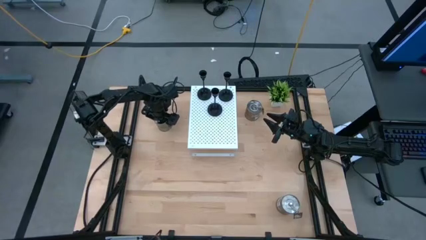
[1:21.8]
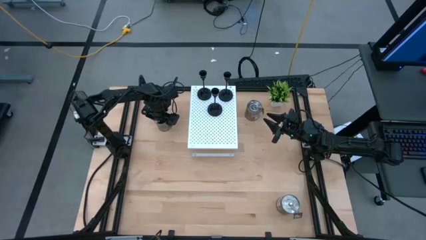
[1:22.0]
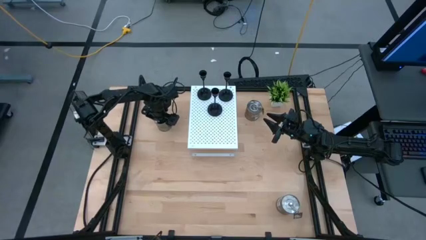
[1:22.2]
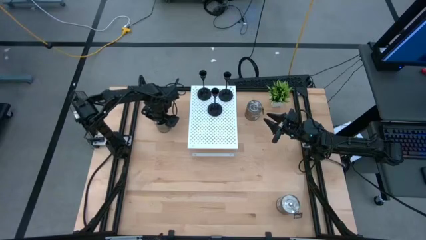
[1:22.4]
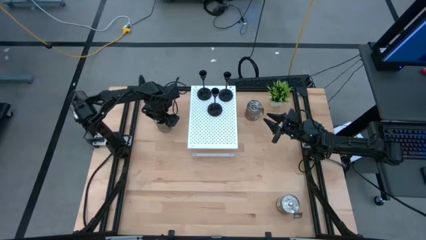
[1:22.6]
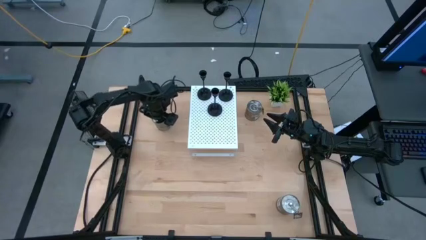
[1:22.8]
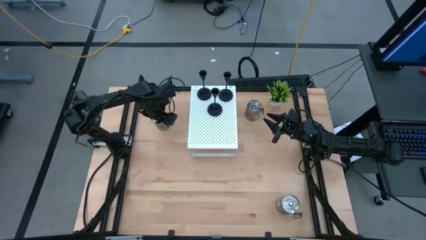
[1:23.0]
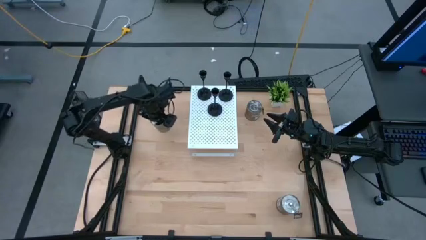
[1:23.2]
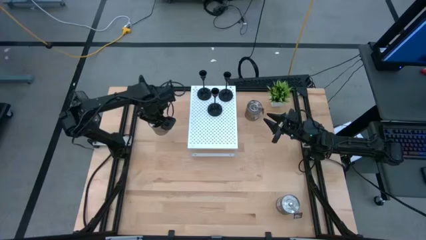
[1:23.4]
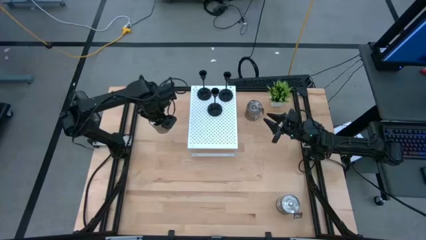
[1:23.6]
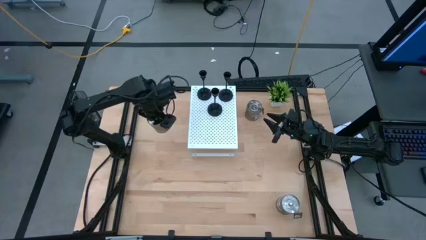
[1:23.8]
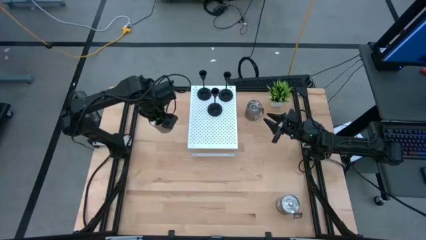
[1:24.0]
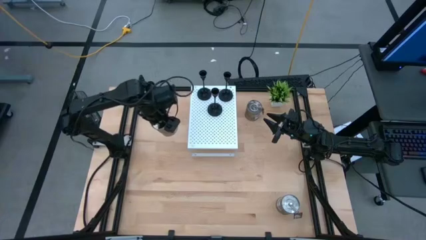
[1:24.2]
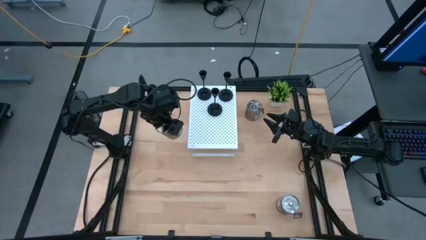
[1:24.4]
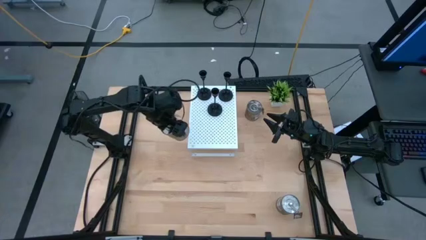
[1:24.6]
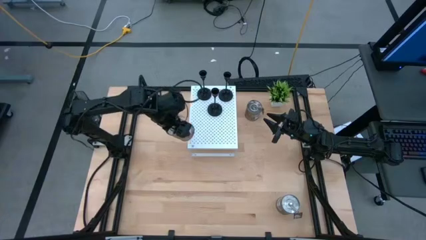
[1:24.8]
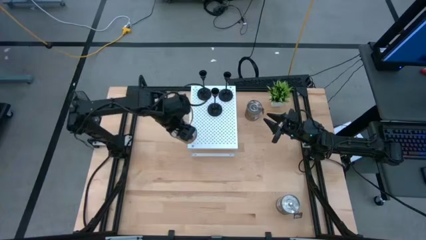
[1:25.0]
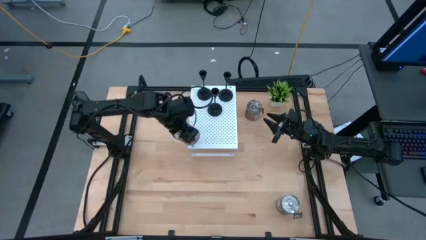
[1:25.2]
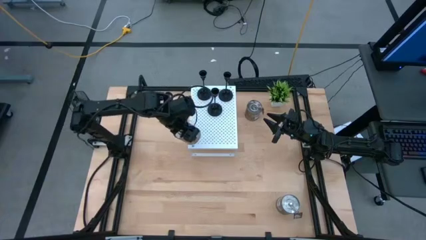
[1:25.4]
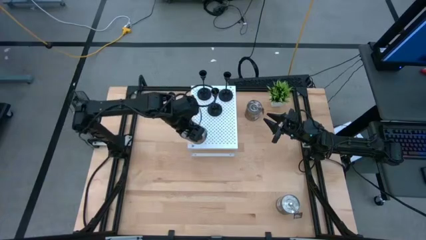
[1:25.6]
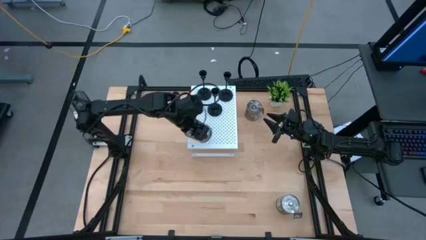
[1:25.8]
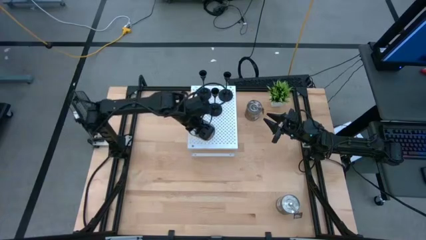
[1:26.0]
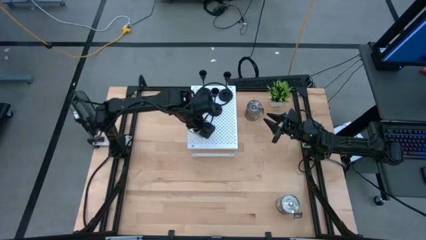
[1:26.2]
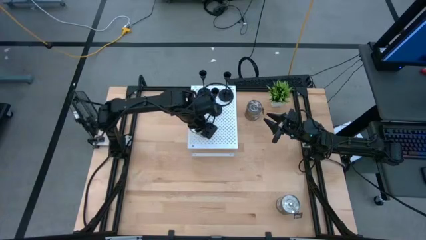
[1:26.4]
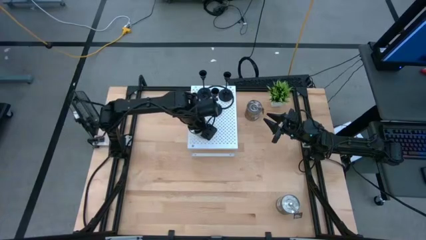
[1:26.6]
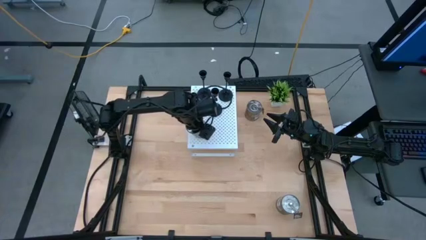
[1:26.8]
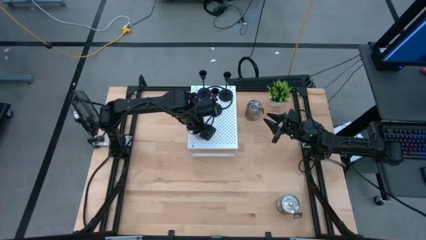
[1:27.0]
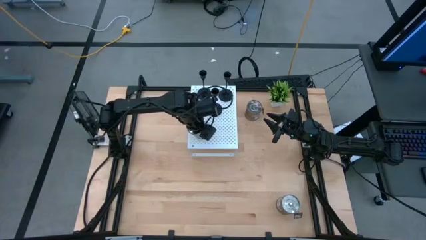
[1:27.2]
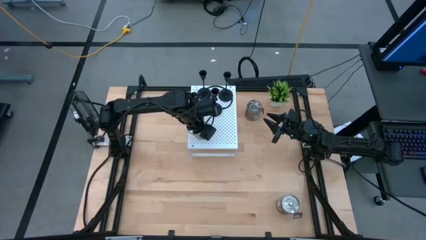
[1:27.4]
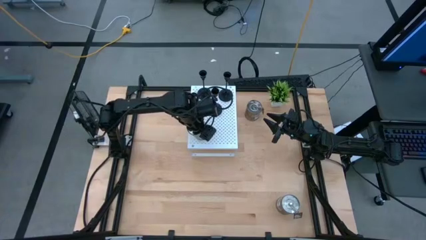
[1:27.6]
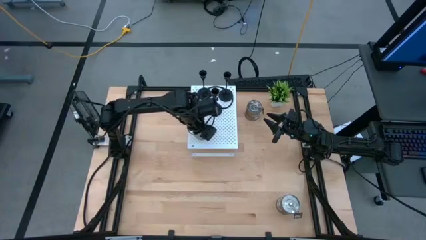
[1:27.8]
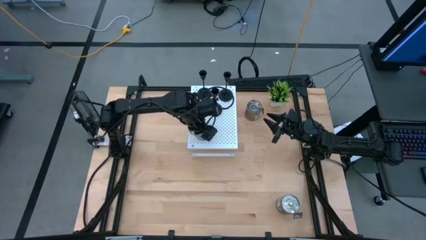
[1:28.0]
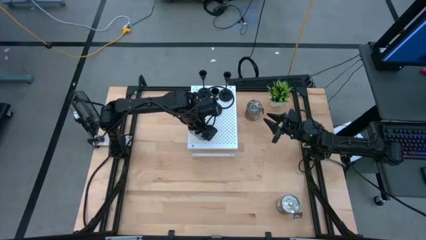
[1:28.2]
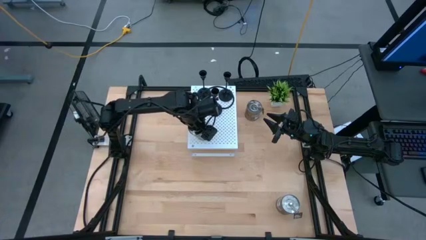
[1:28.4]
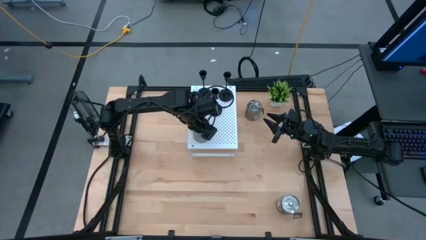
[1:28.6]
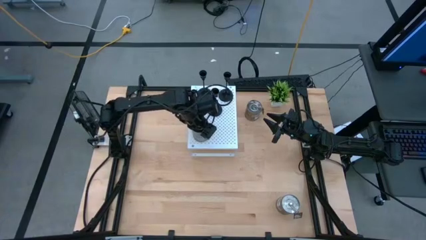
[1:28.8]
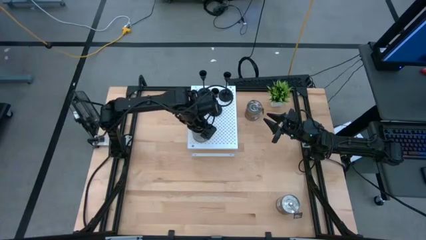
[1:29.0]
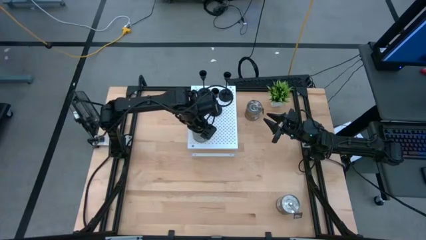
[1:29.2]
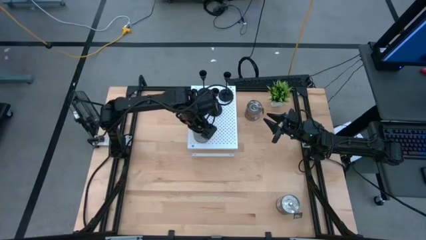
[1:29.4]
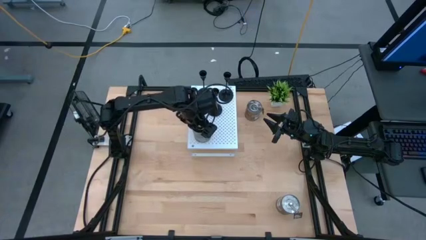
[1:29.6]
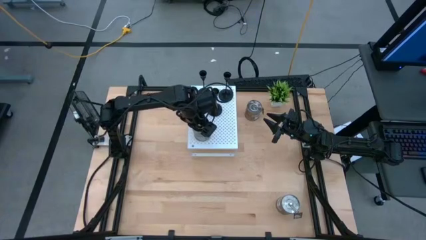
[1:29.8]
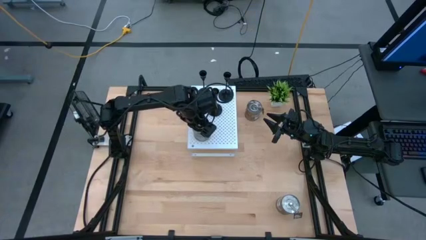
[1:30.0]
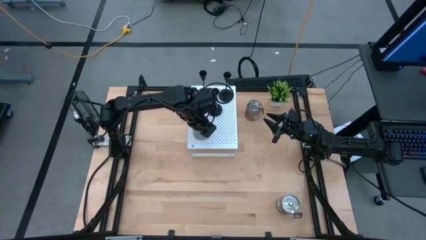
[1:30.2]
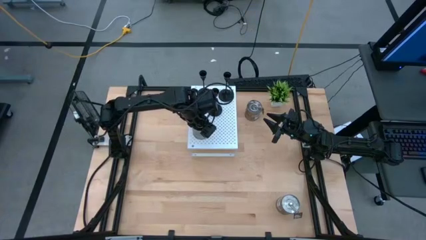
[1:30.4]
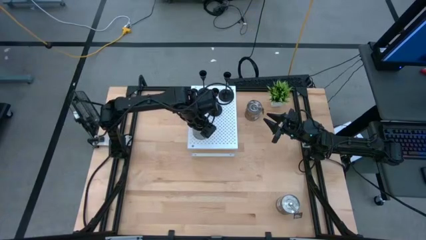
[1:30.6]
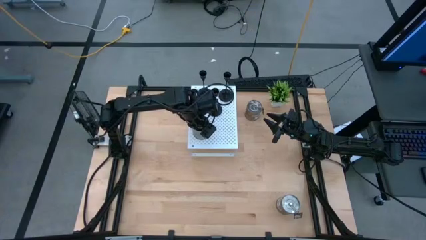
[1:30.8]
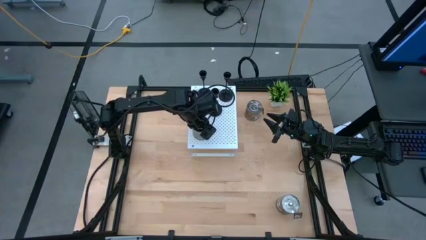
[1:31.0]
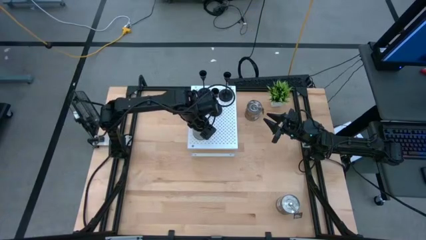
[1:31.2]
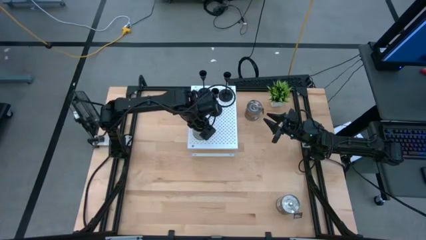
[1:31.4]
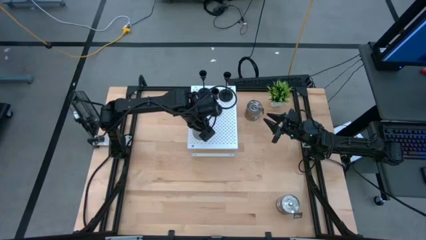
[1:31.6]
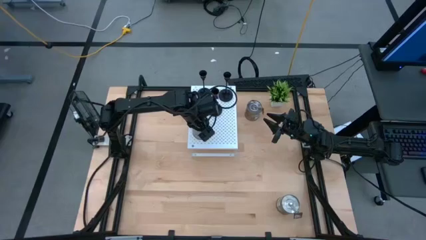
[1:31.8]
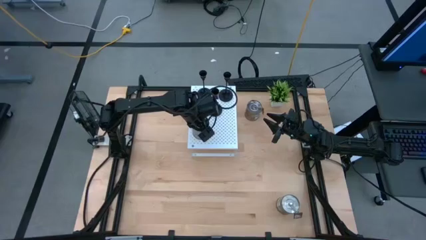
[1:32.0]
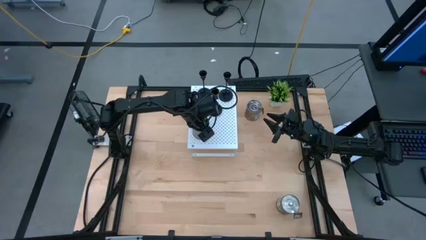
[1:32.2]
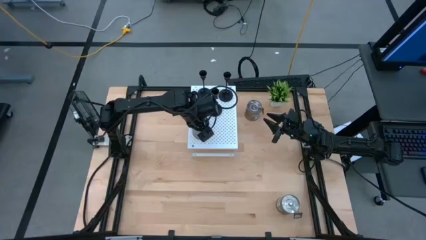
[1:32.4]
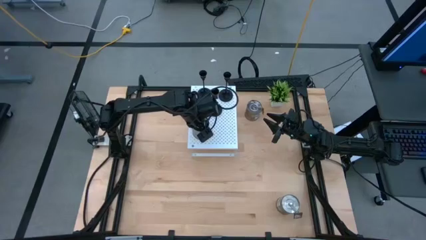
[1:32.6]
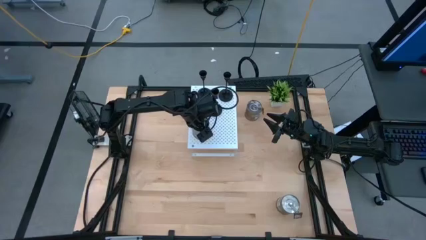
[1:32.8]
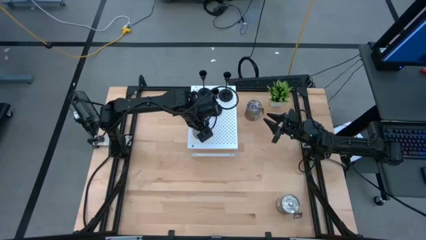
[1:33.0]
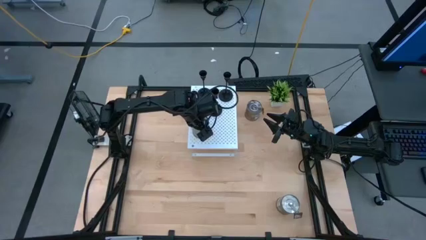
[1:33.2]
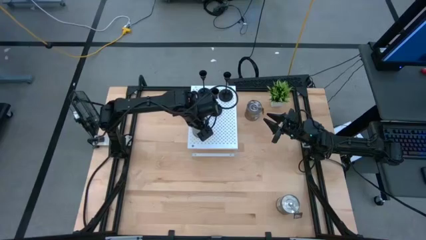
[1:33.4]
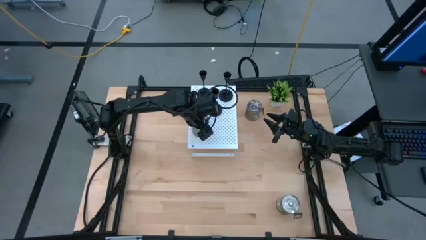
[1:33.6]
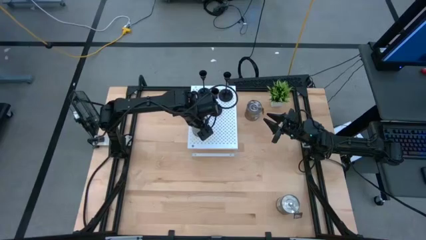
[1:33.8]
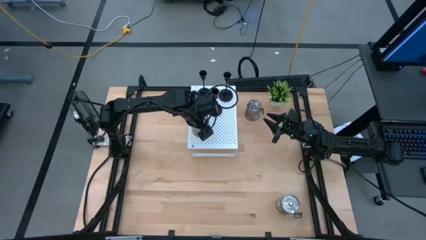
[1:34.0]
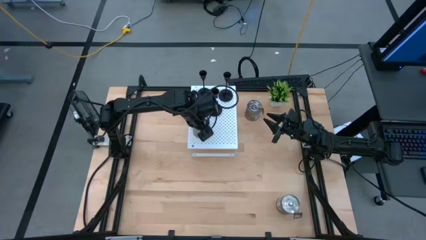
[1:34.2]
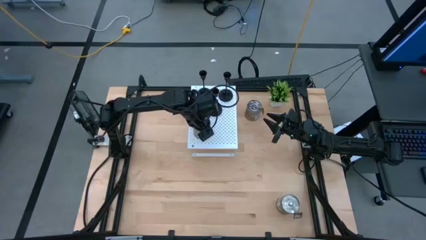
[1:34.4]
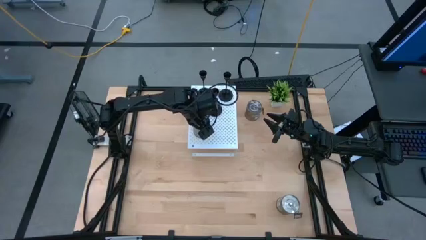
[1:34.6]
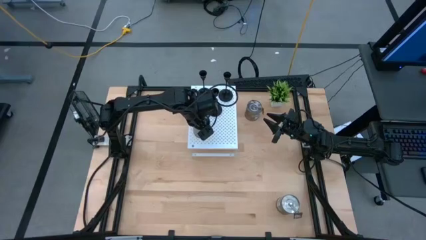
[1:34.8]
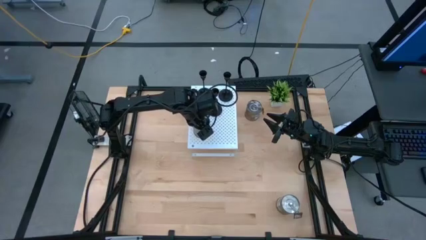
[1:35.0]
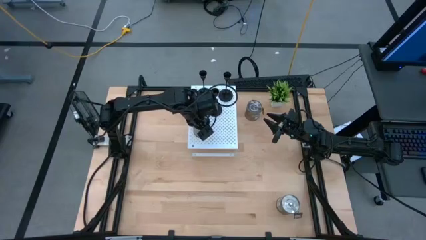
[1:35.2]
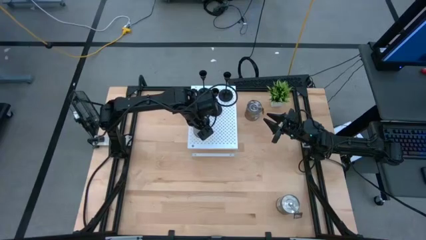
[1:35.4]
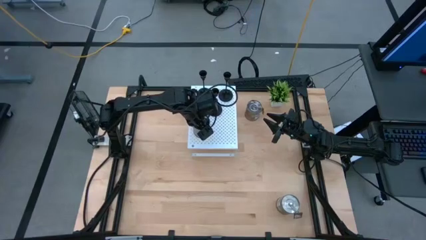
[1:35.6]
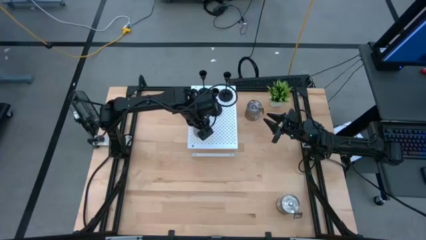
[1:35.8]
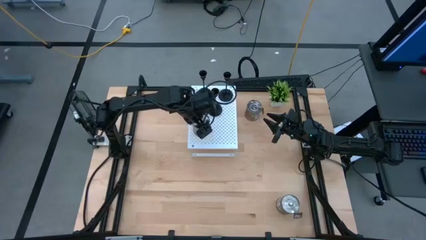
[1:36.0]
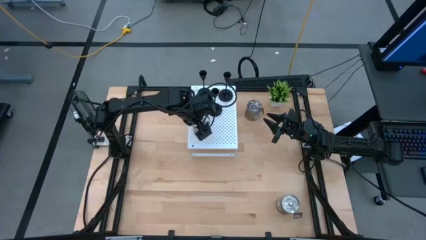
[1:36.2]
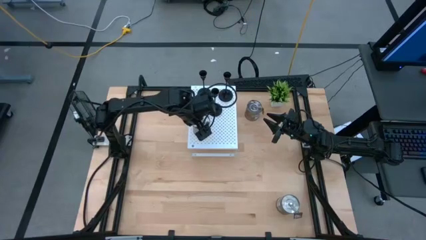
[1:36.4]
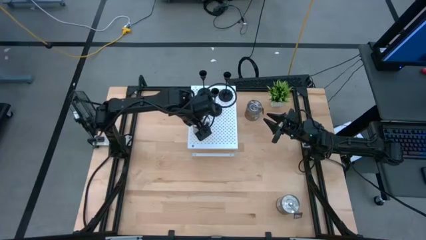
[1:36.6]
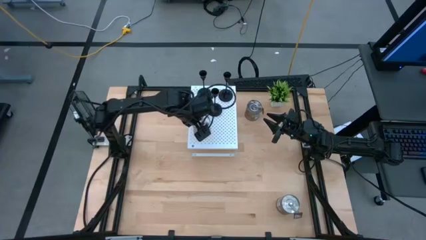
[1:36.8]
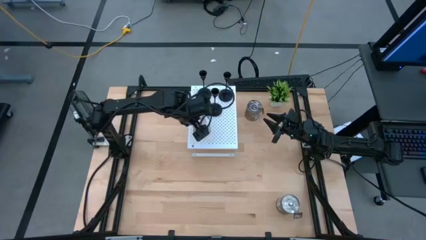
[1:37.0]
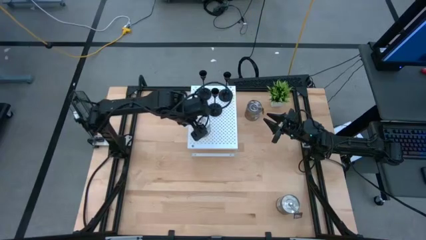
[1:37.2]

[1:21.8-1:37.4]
Task: Pick & Place candle stick holders
Put the top left brown scented candle on the shelf
